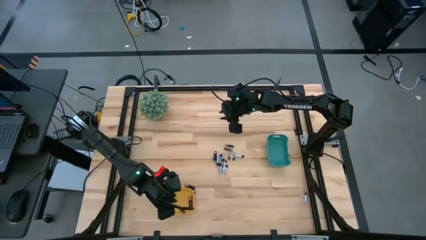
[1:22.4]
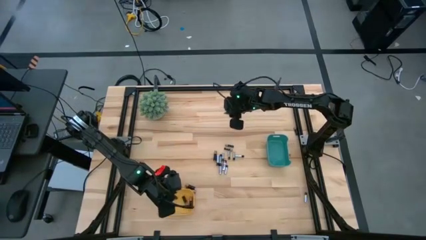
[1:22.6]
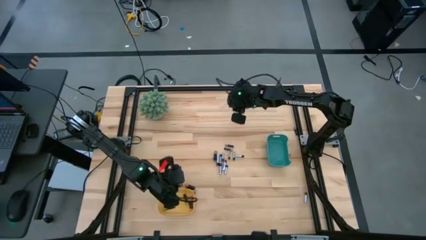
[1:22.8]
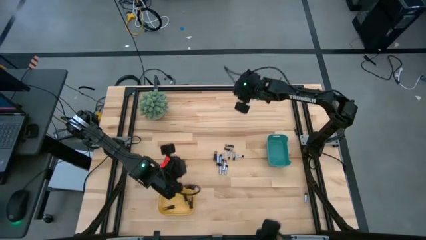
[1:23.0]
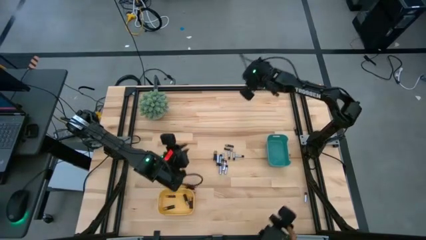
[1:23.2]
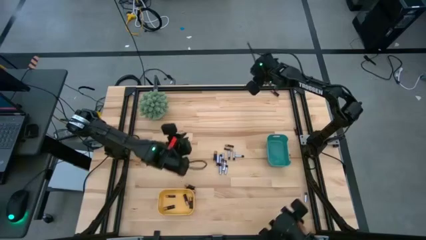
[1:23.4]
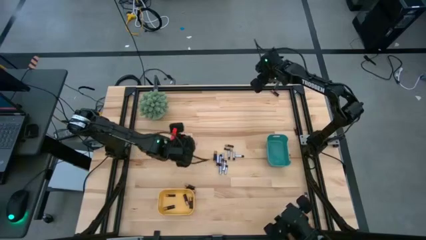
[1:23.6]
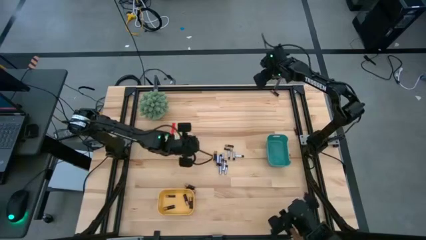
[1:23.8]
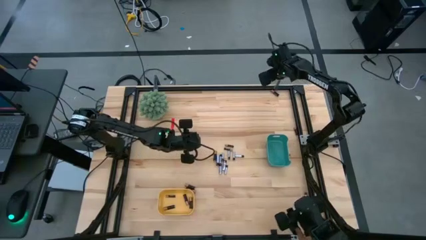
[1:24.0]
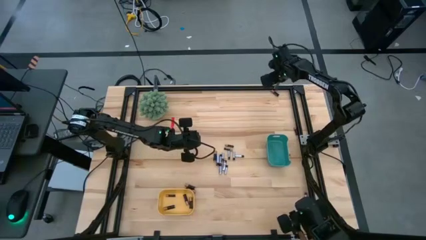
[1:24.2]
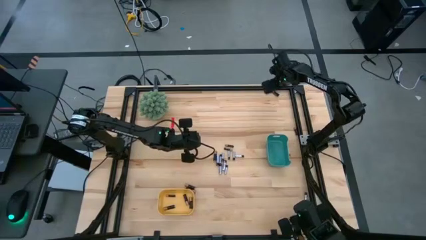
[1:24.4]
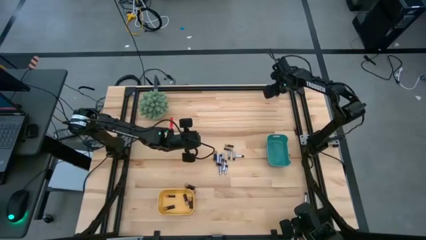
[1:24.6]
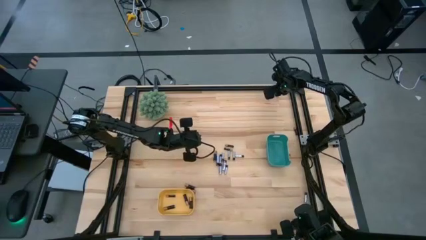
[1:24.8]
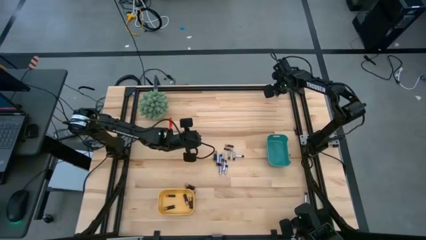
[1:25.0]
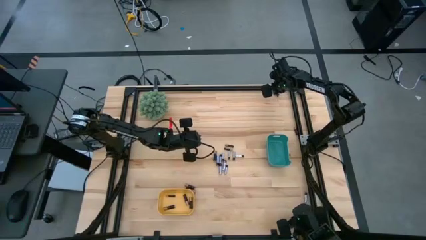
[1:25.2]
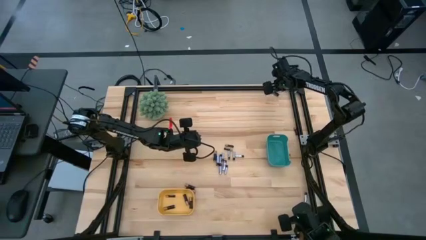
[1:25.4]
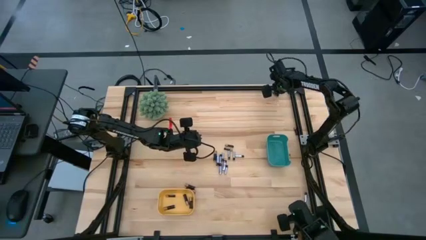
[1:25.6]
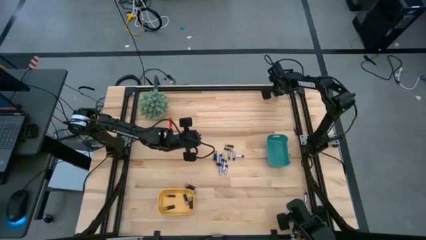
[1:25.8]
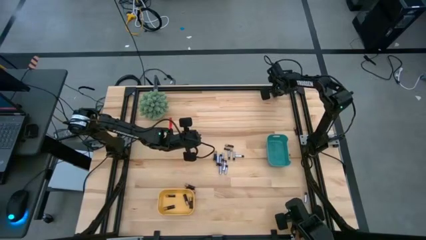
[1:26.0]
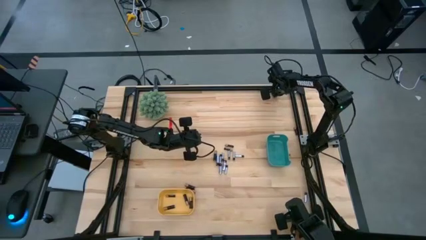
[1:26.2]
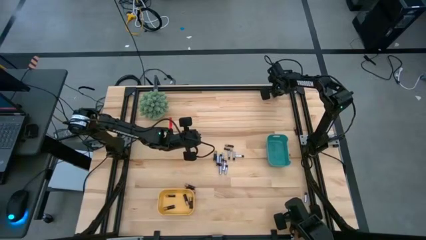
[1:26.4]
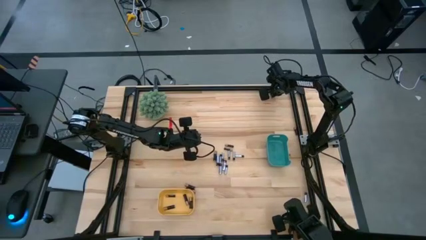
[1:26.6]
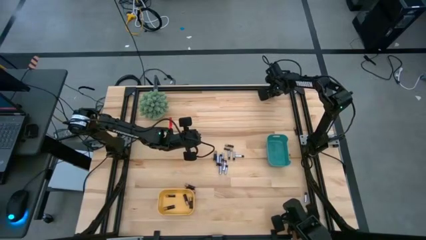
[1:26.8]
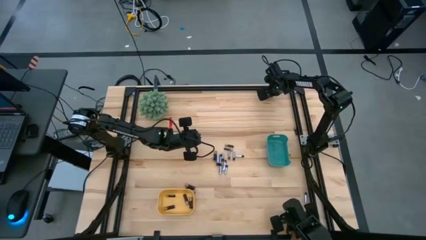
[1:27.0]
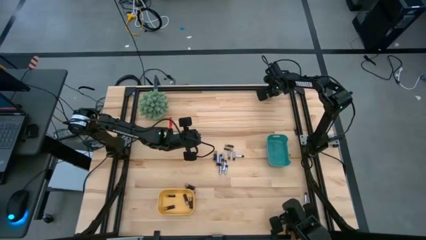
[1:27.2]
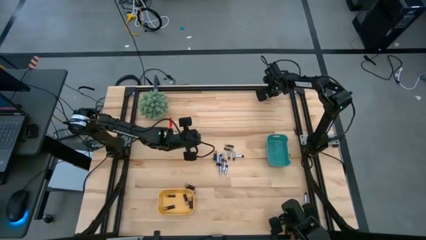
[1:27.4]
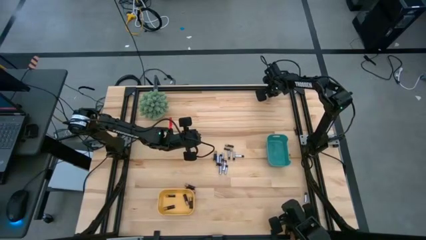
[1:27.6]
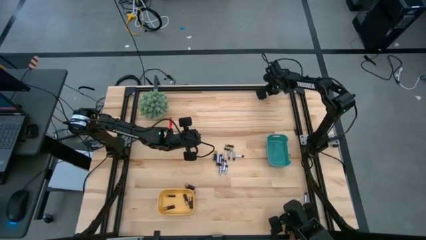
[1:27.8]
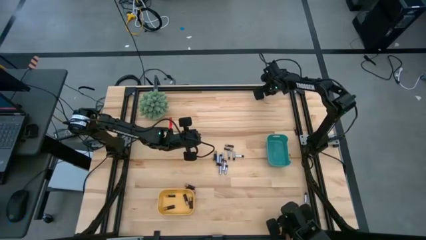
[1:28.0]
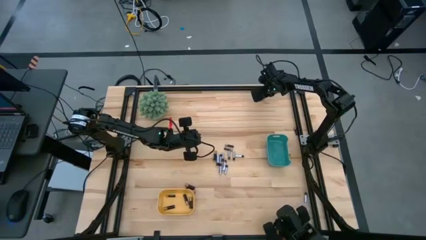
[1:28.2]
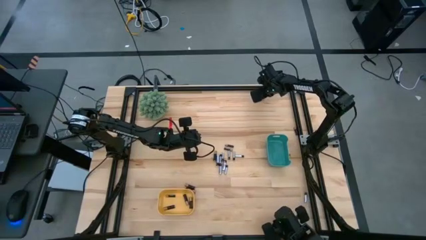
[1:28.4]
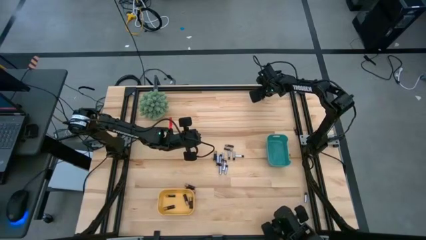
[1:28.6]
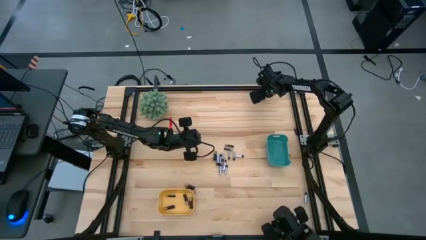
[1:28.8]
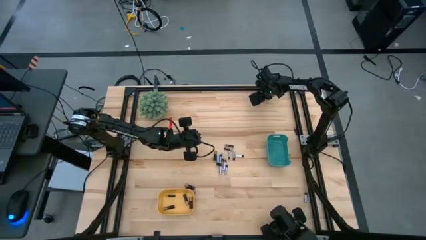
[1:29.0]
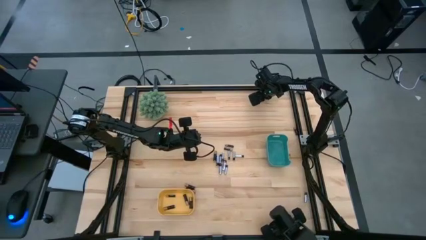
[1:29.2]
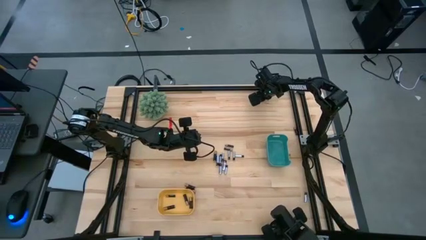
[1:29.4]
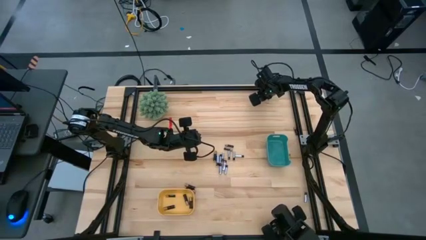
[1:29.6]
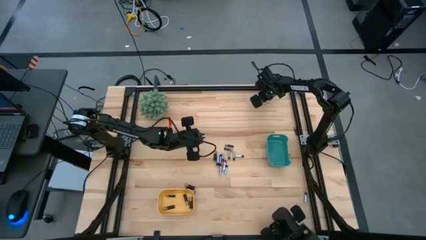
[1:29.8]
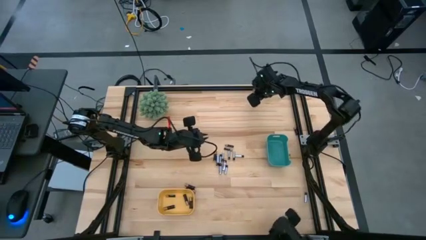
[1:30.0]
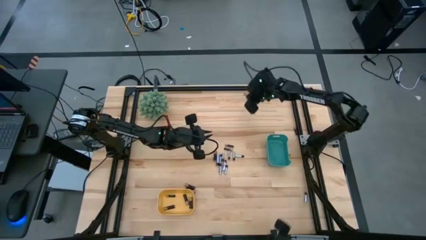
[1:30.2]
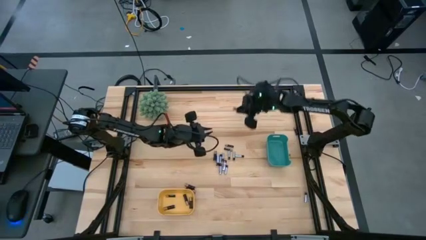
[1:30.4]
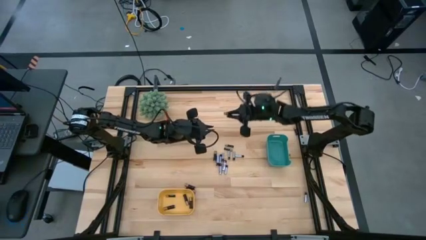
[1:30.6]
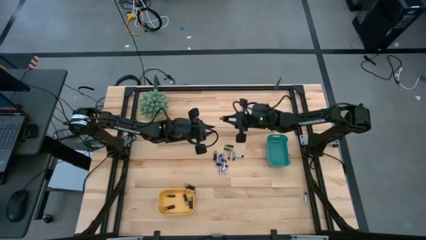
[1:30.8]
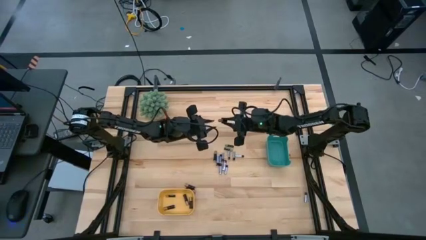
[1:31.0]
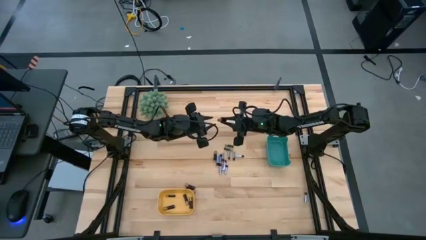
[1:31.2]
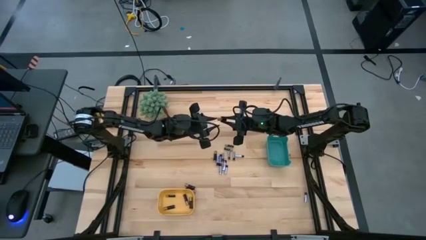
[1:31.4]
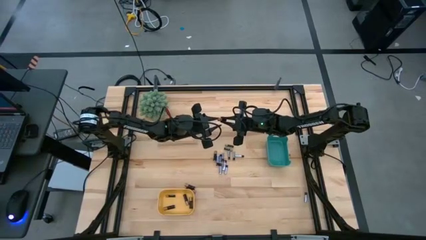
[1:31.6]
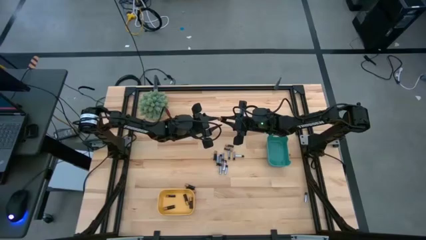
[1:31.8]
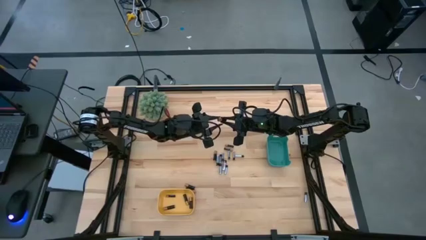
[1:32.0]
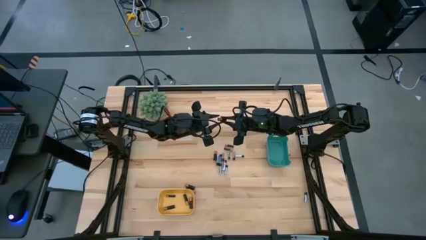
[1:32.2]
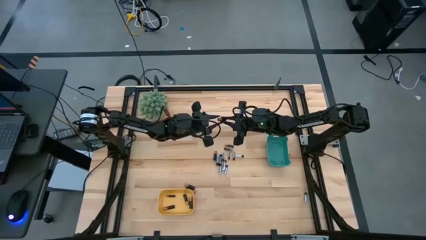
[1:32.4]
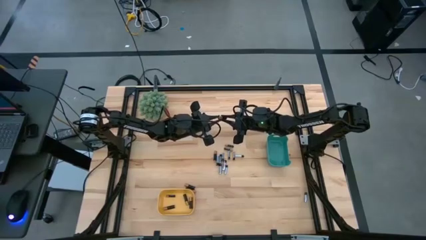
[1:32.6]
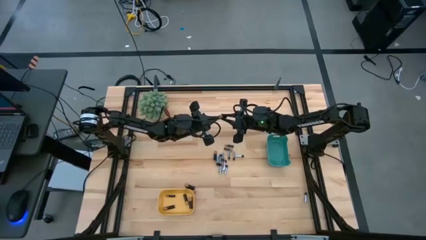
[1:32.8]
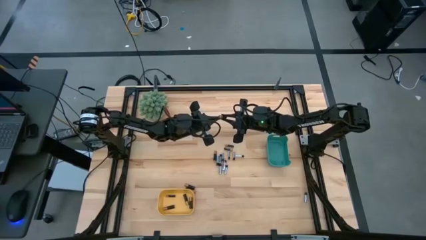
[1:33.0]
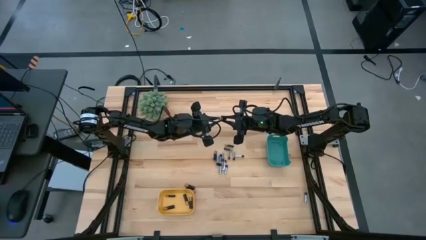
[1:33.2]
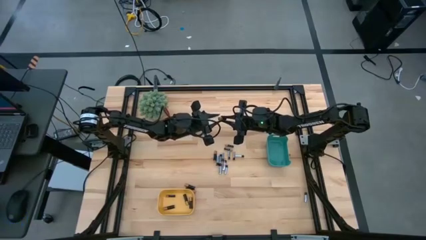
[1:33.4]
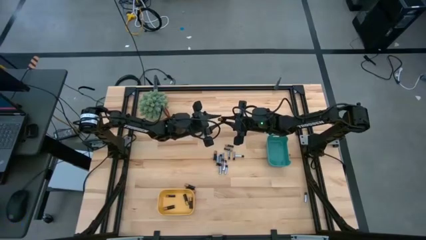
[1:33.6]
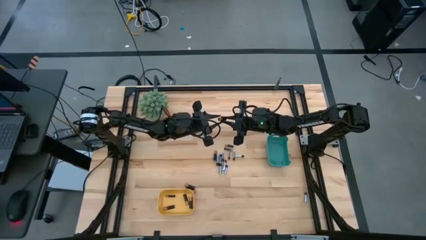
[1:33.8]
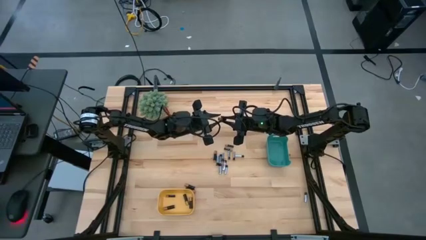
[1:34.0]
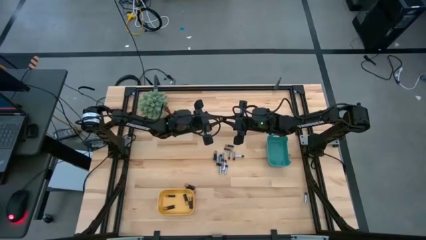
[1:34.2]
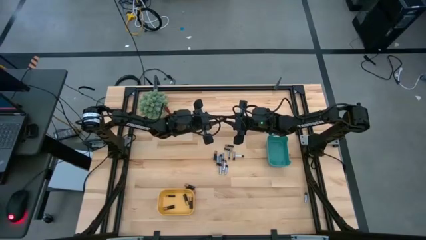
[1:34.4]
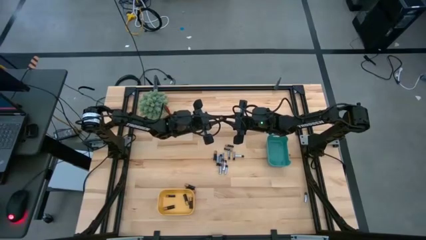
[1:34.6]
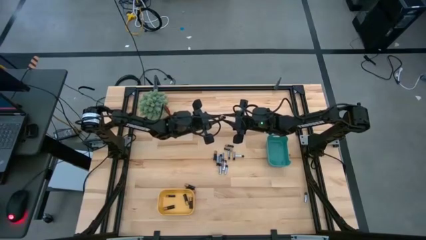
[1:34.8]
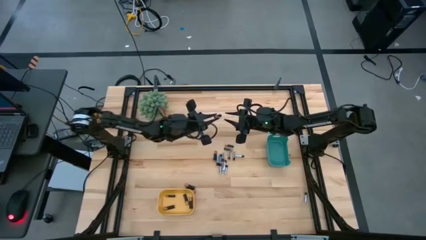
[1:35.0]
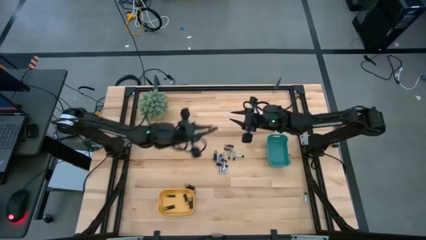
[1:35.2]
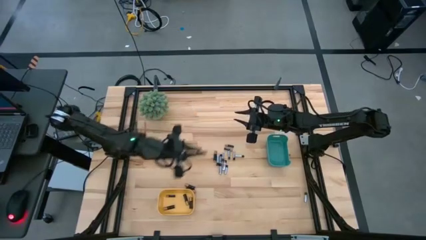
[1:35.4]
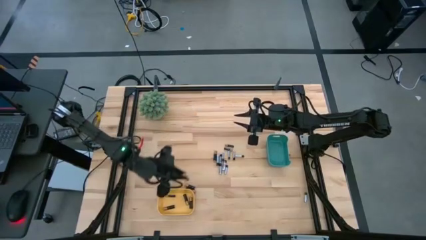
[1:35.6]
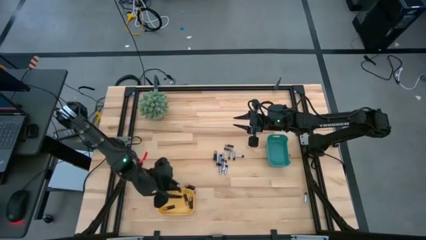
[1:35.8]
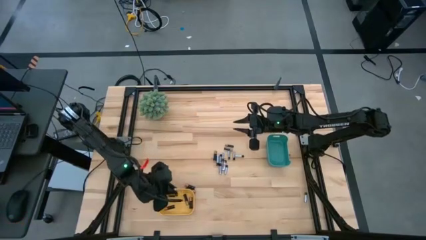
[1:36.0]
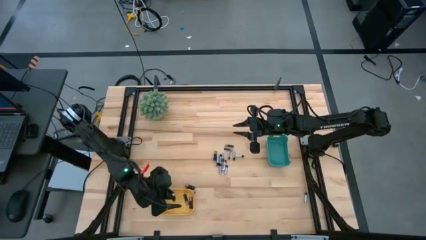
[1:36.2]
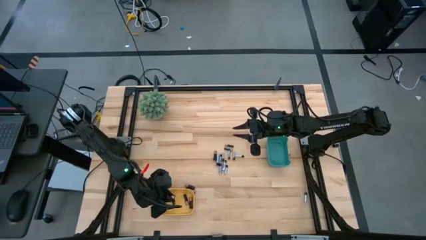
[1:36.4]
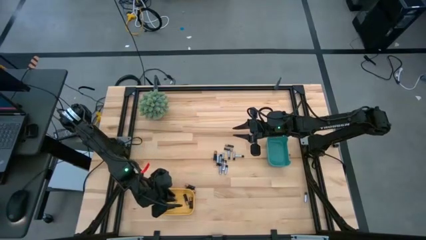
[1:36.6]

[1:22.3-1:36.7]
Task: Sort batteries
Put the black battery into the yellow bin
